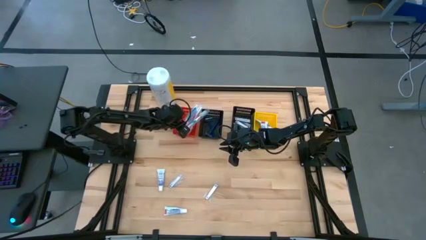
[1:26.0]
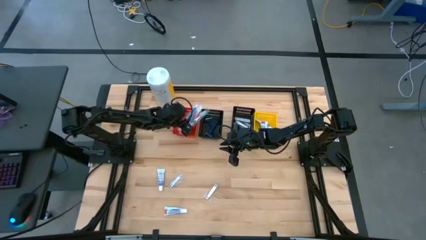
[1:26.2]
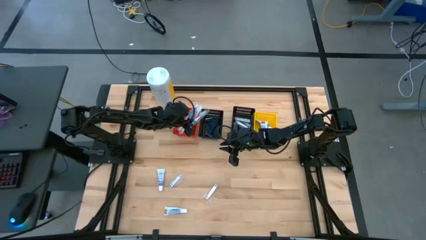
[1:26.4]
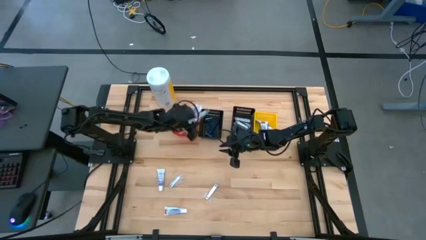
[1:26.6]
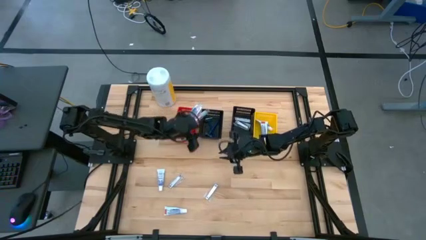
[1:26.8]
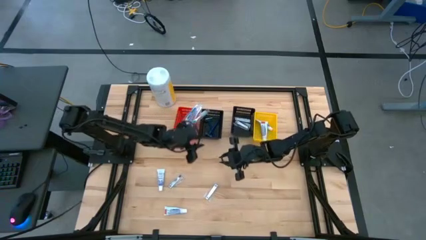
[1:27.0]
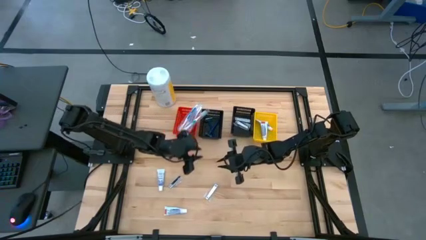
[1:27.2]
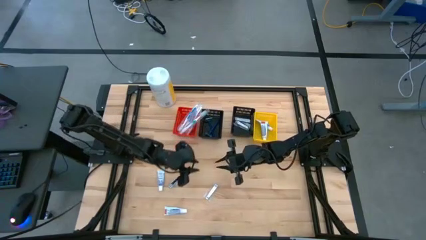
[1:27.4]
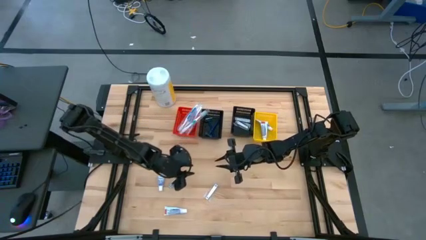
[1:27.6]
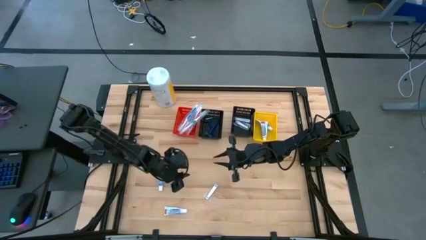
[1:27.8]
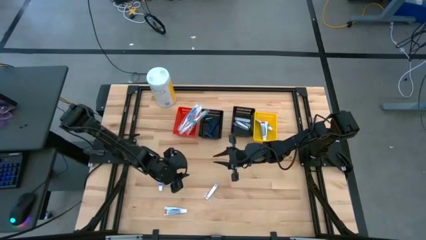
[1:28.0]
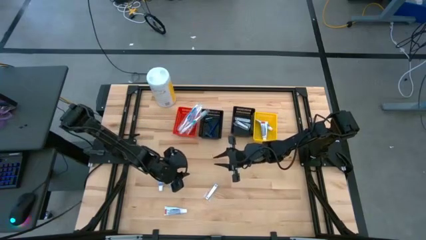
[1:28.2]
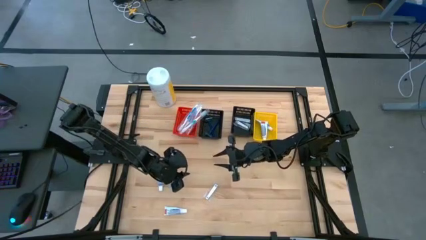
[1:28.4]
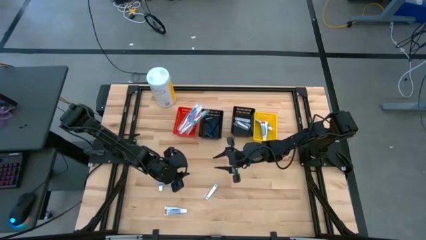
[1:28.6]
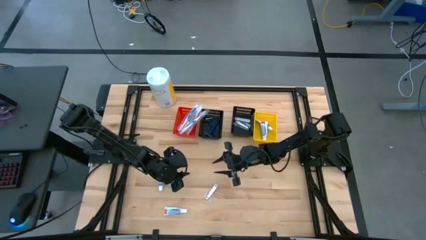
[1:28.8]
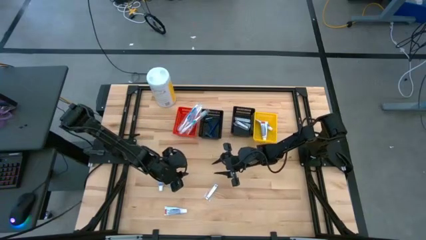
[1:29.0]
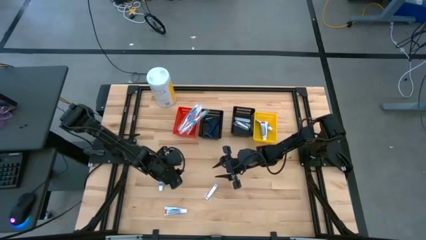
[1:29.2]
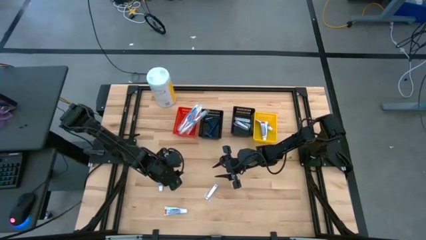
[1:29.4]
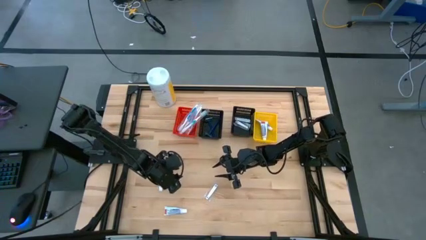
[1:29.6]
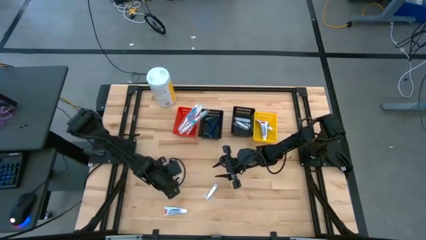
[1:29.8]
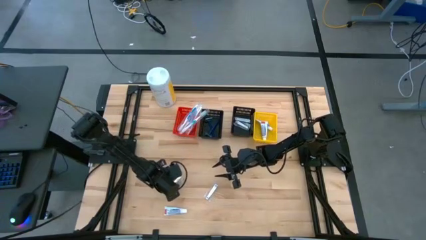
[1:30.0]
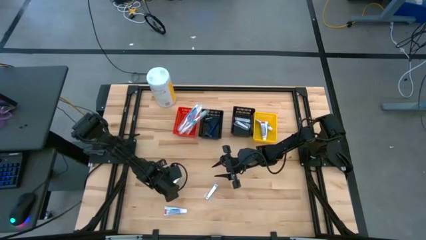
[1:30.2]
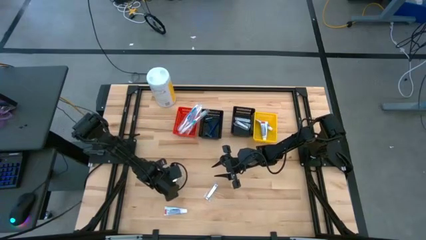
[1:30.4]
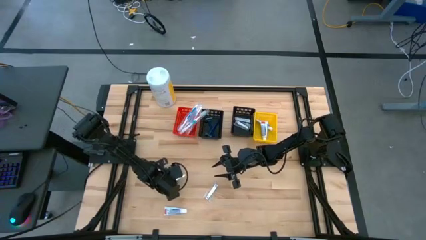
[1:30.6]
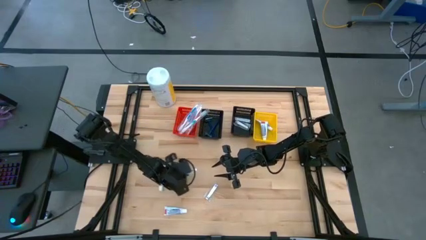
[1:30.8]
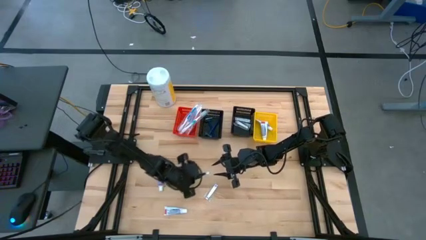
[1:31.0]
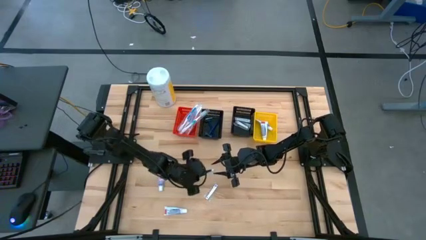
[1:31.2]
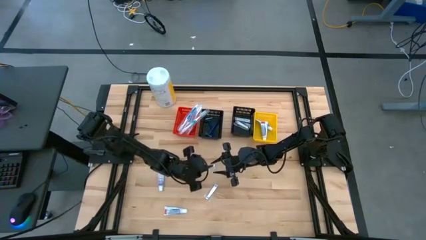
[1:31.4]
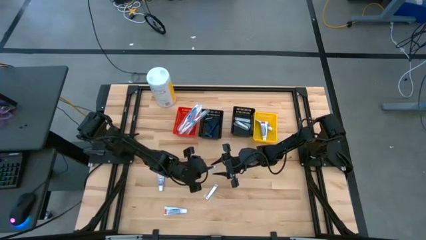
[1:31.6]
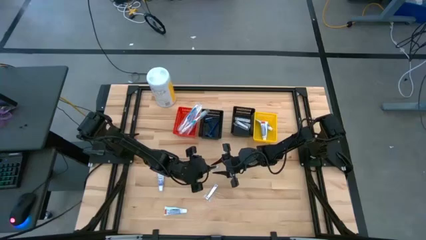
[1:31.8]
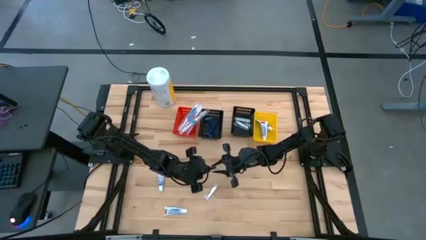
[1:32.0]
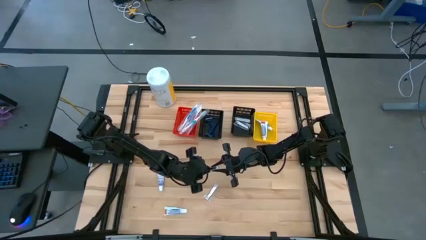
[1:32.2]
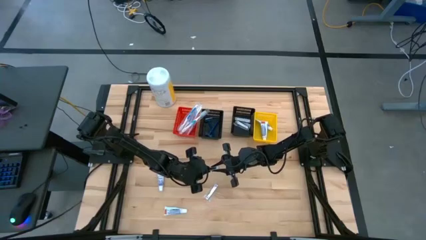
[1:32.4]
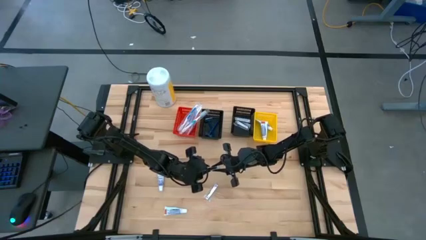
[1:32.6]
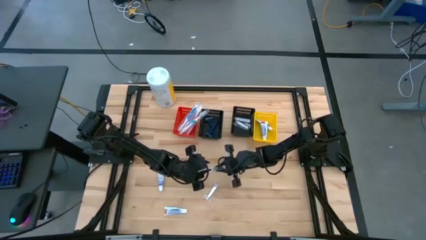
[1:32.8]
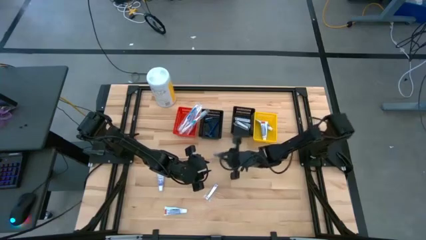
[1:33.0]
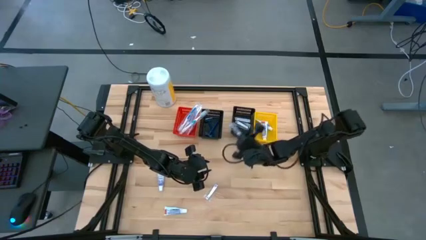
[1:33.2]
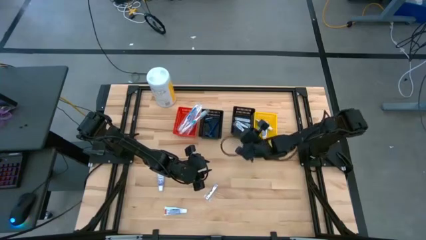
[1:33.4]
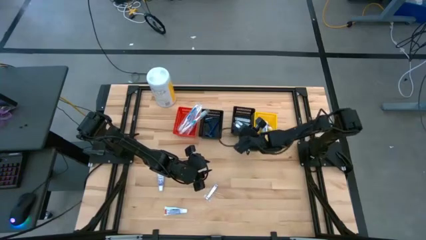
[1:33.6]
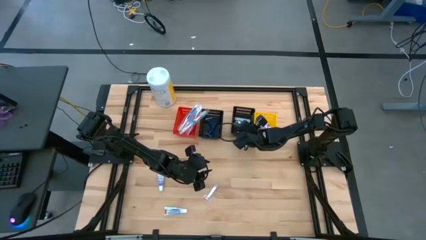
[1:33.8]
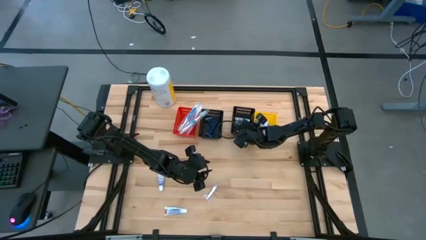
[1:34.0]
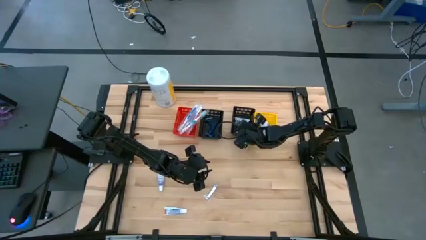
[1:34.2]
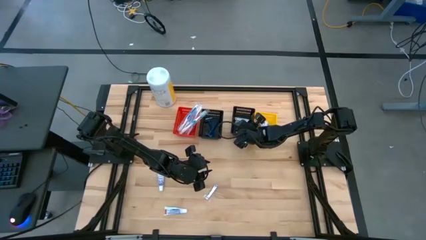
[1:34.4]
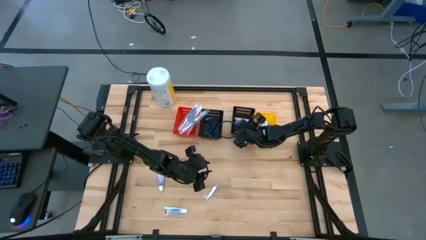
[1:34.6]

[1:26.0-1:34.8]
Task: Pick & Place Travel size toiletries
Put the silver nail cutter into the right black basket

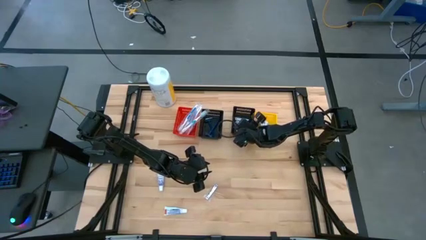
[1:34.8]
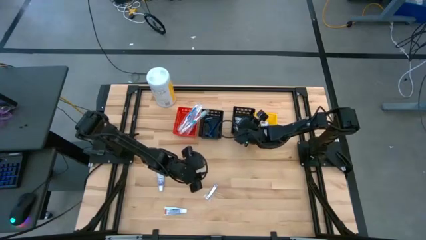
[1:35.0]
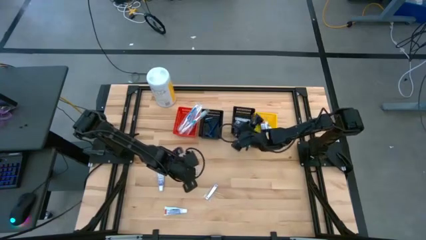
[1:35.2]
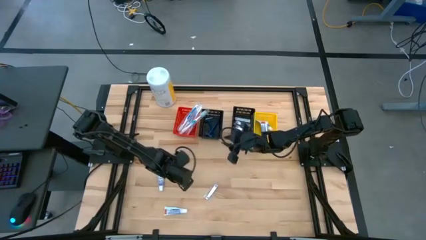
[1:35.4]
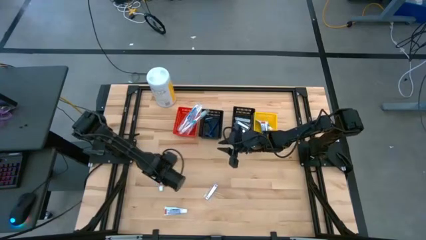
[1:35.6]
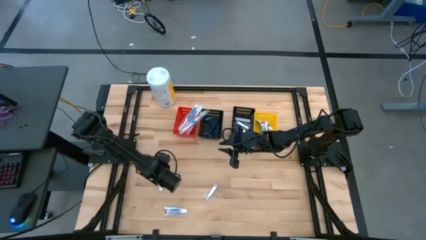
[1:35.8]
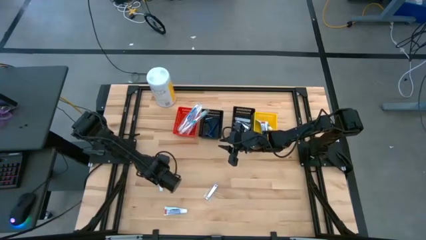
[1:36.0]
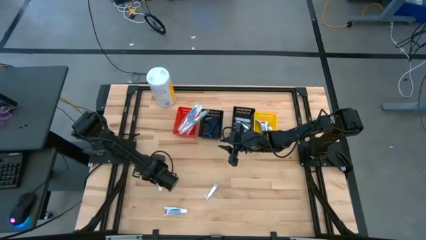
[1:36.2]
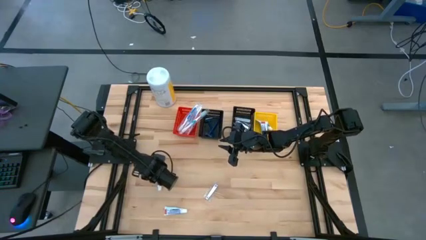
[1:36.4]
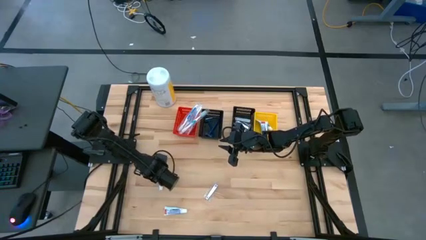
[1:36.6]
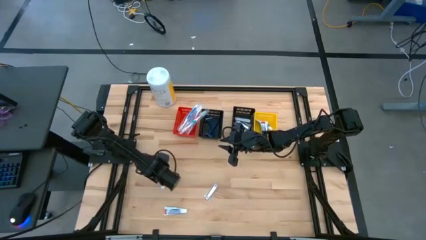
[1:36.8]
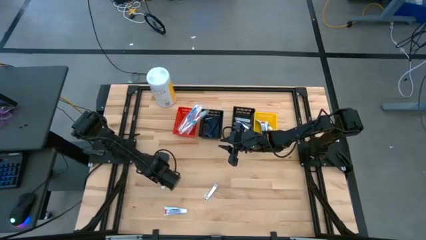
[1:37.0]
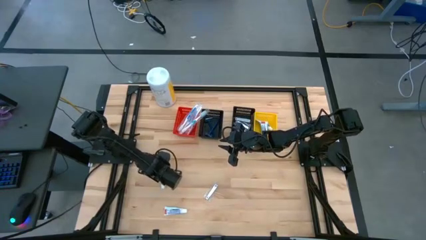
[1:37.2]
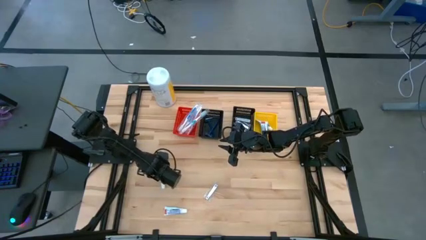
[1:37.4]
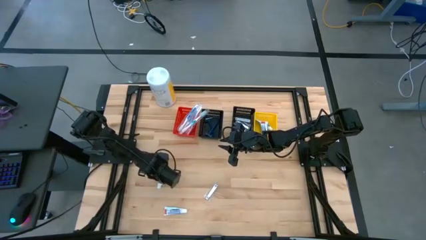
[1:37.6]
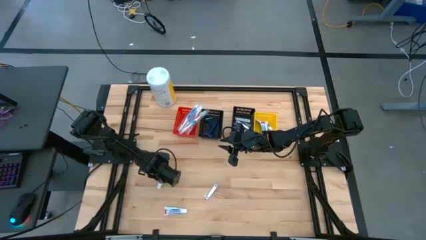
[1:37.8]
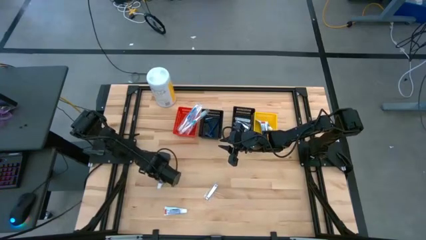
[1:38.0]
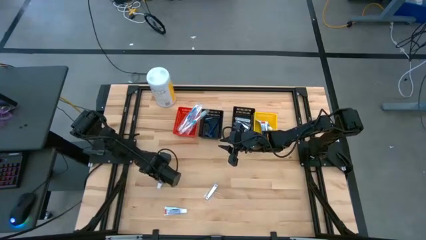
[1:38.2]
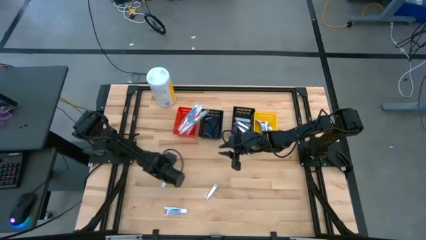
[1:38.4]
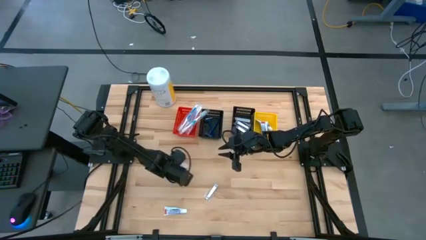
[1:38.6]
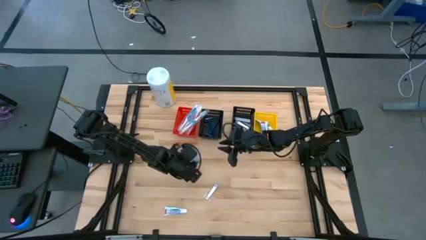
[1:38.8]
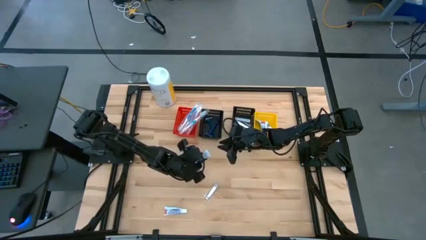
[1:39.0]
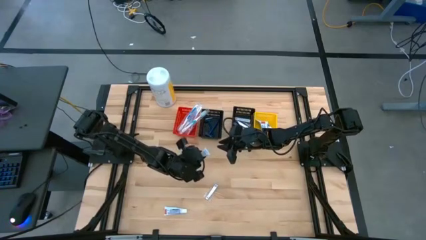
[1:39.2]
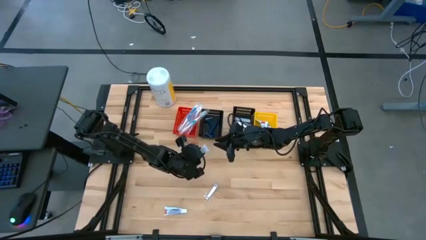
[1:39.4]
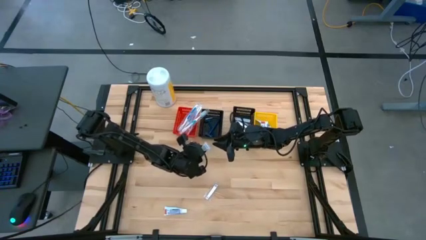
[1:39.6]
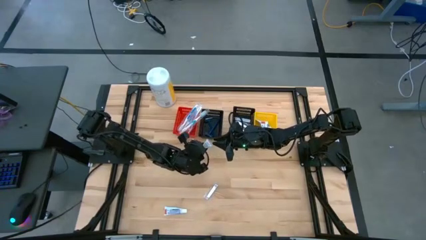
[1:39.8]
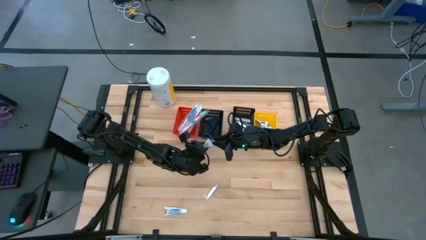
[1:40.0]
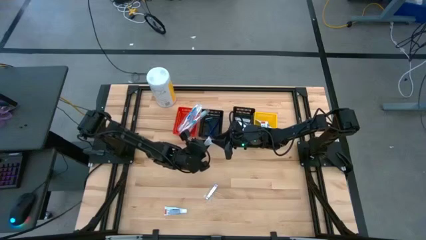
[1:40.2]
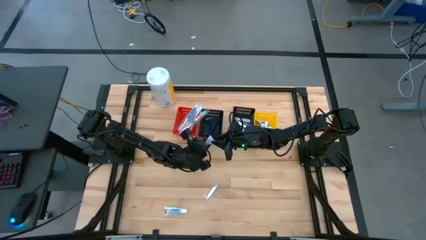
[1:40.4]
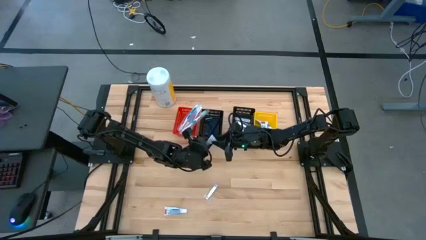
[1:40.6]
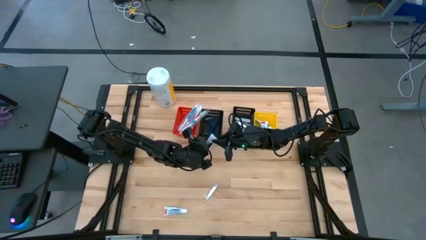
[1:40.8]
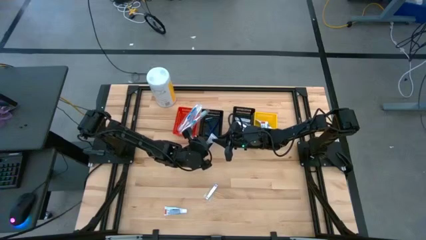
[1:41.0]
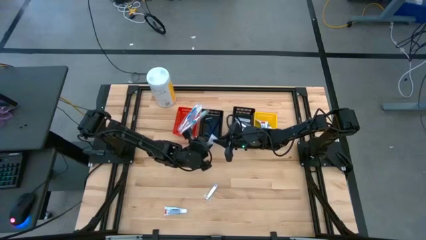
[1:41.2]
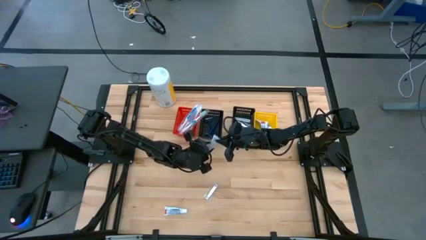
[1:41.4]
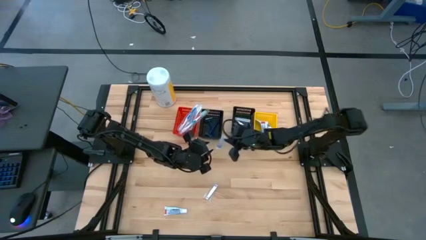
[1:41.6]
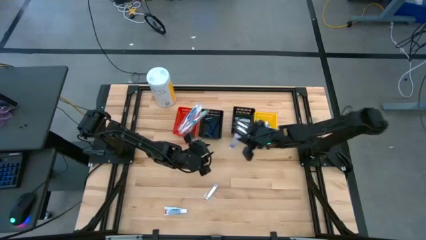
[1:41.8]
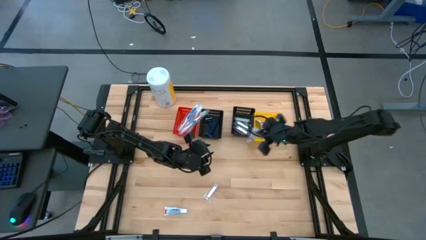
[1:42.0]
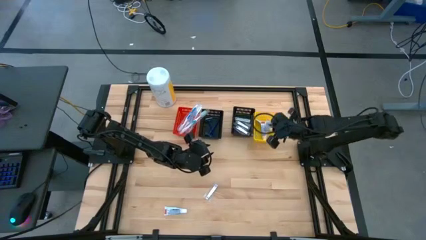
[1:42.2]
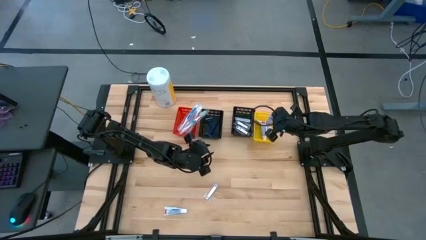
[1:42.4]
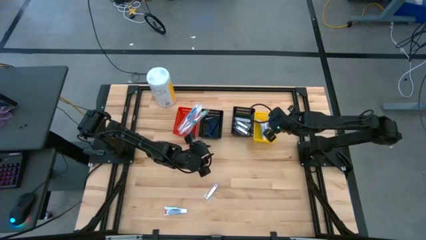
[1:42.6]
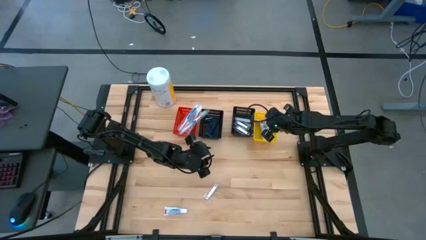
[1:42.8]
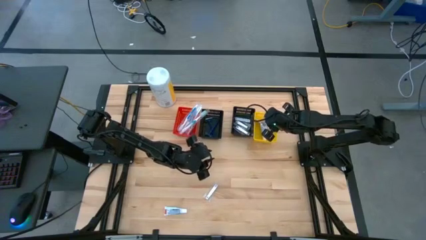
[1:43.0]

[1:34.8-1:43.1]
Put the white toothpaste into the yellow basket
